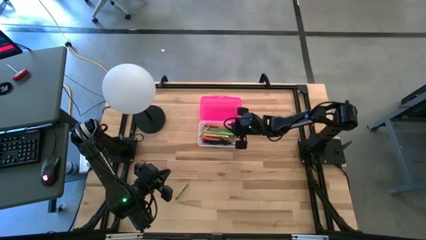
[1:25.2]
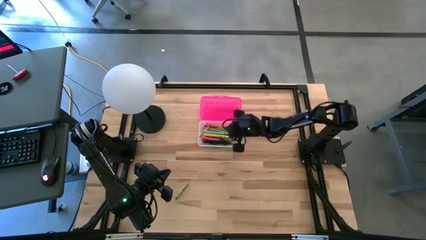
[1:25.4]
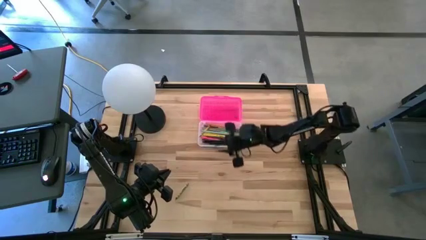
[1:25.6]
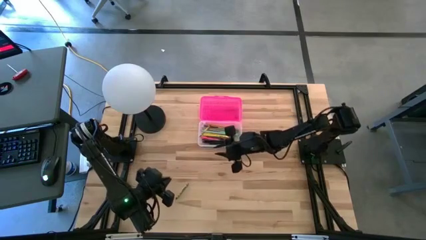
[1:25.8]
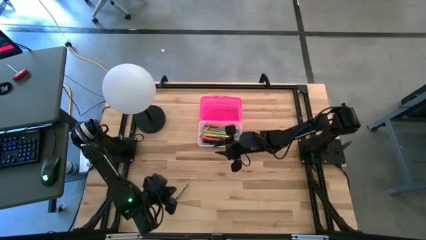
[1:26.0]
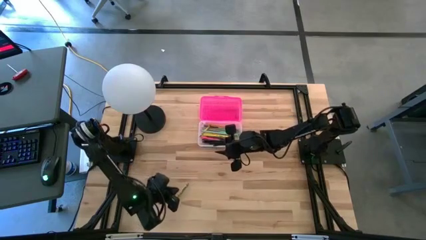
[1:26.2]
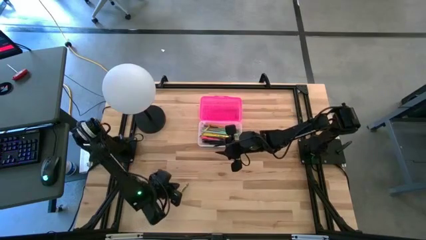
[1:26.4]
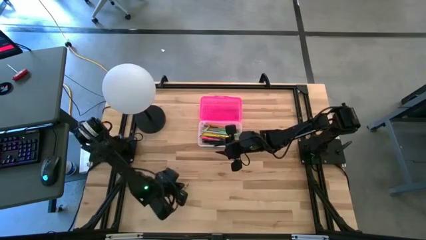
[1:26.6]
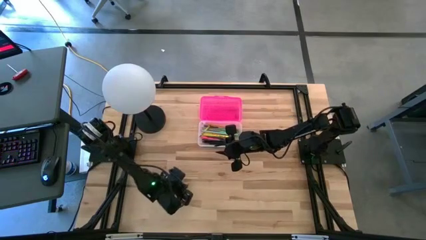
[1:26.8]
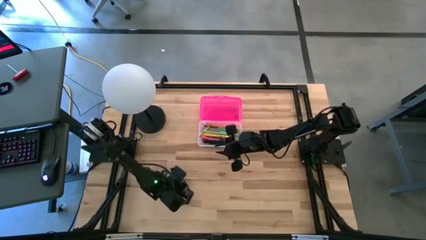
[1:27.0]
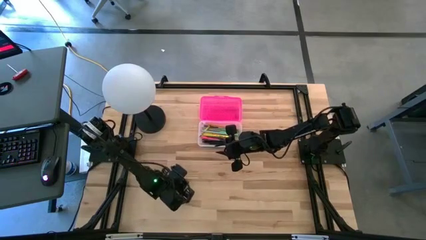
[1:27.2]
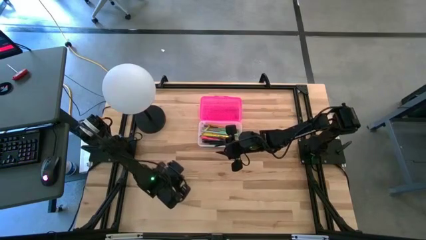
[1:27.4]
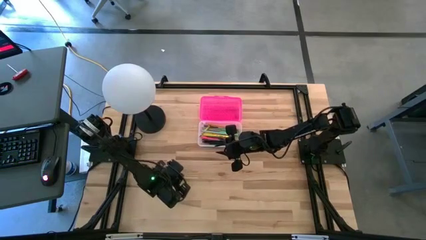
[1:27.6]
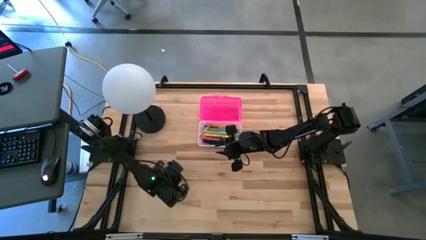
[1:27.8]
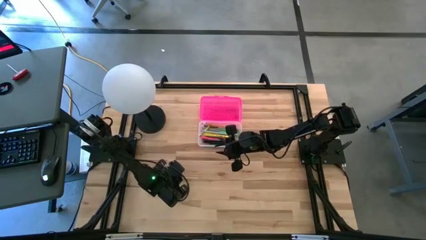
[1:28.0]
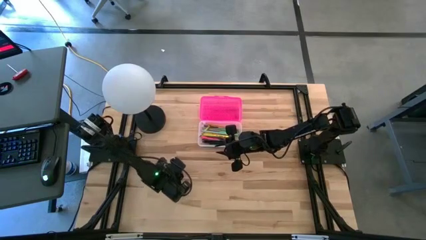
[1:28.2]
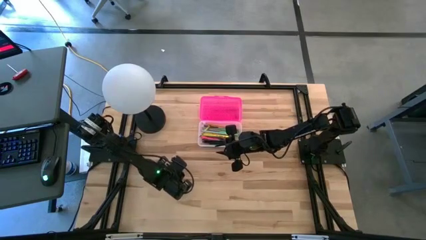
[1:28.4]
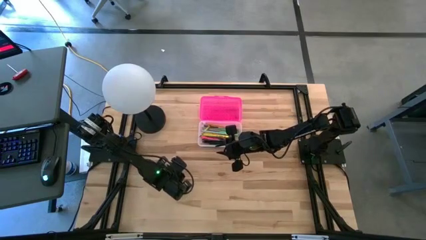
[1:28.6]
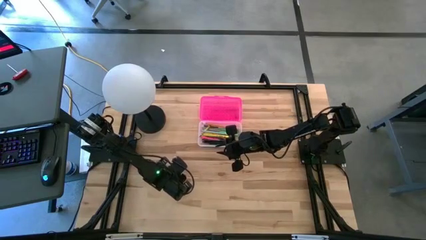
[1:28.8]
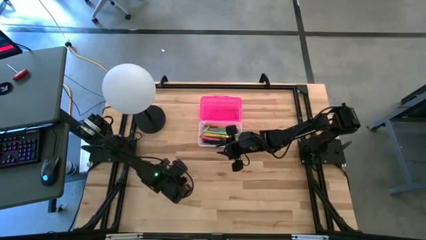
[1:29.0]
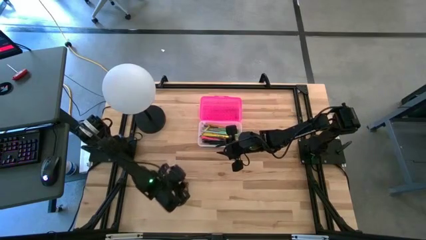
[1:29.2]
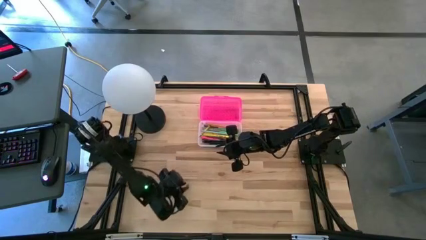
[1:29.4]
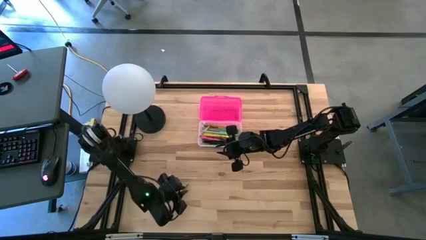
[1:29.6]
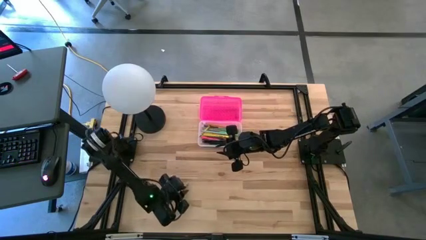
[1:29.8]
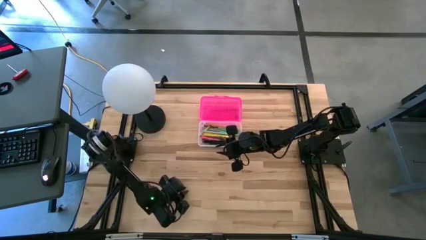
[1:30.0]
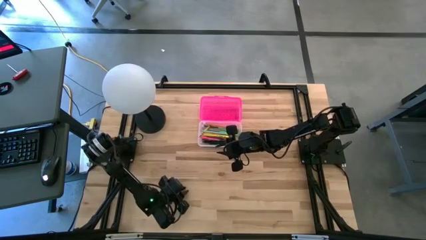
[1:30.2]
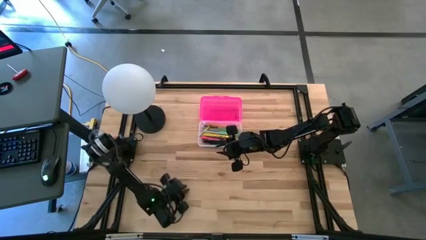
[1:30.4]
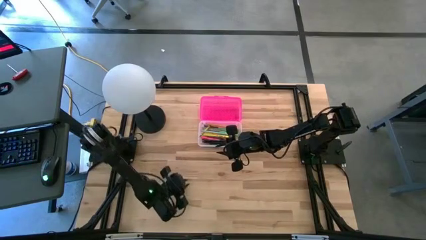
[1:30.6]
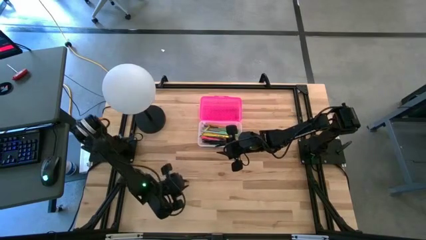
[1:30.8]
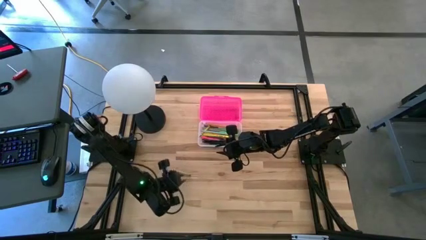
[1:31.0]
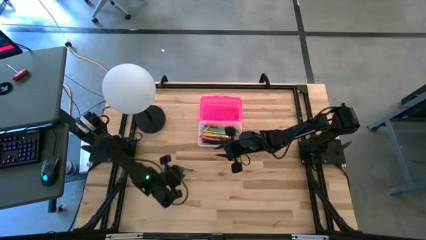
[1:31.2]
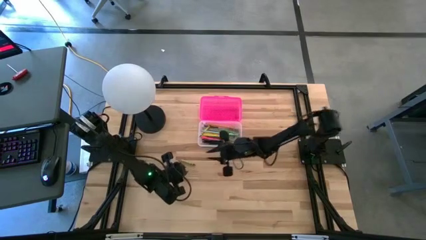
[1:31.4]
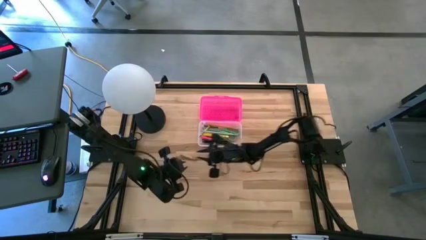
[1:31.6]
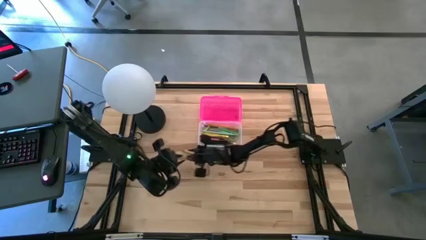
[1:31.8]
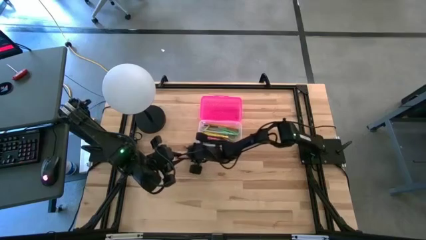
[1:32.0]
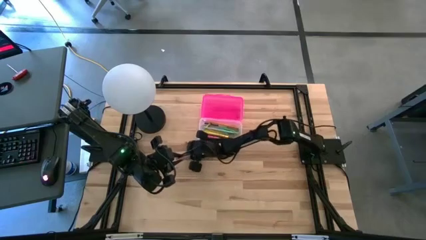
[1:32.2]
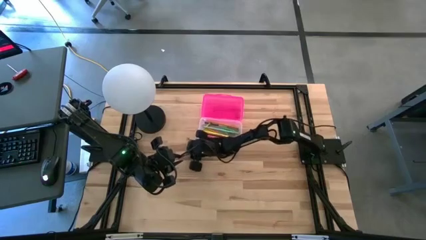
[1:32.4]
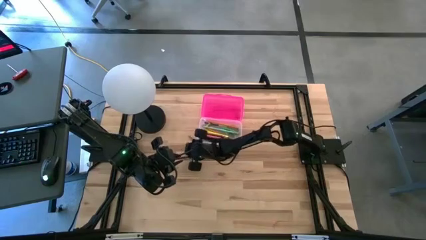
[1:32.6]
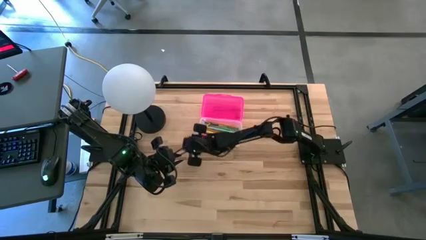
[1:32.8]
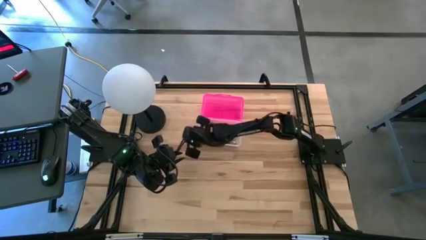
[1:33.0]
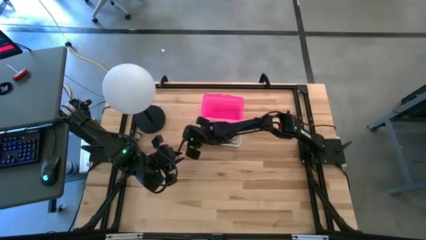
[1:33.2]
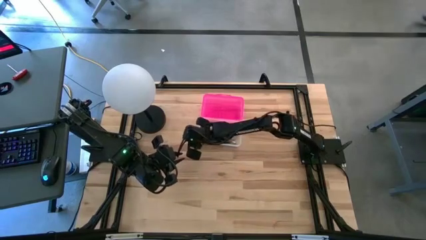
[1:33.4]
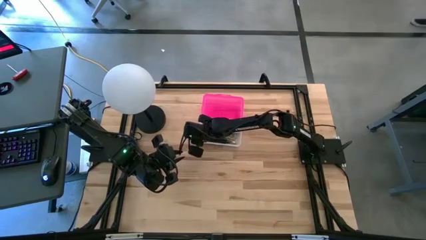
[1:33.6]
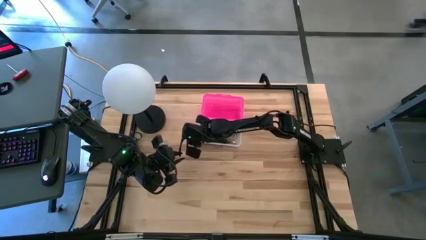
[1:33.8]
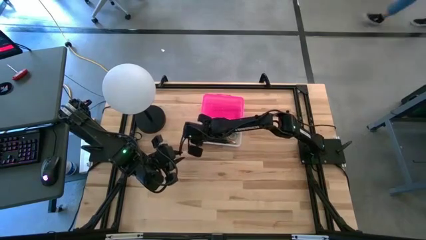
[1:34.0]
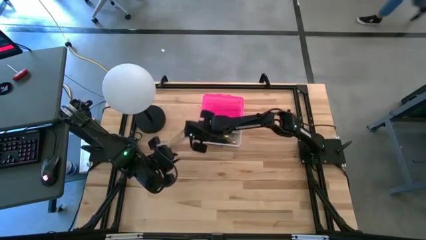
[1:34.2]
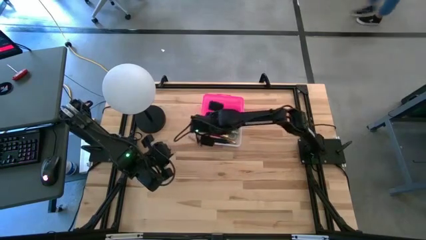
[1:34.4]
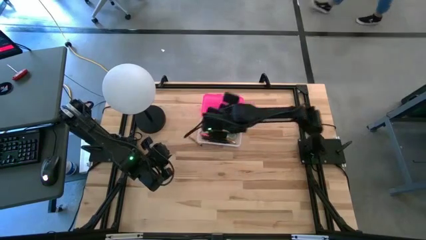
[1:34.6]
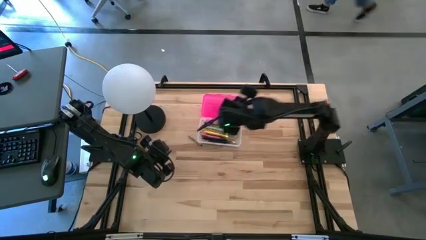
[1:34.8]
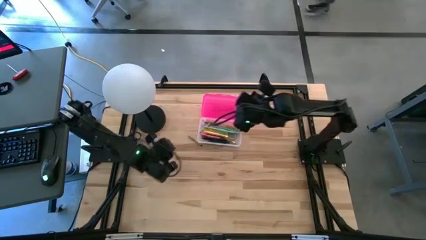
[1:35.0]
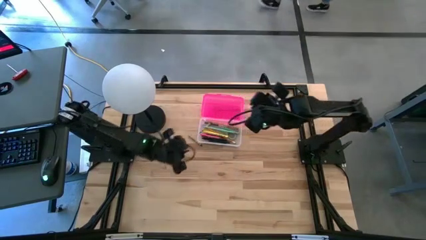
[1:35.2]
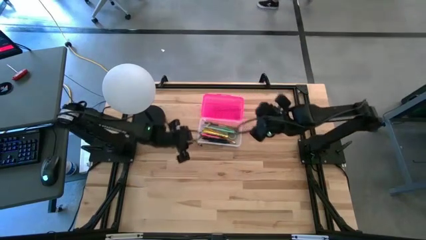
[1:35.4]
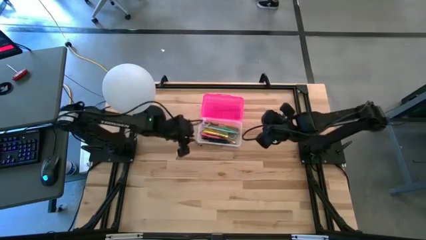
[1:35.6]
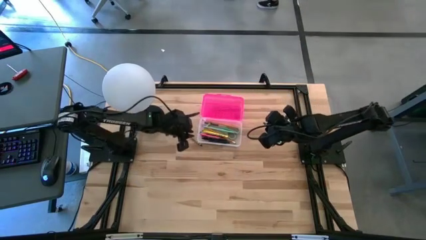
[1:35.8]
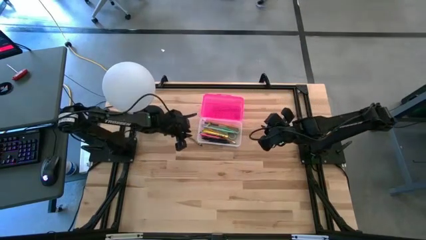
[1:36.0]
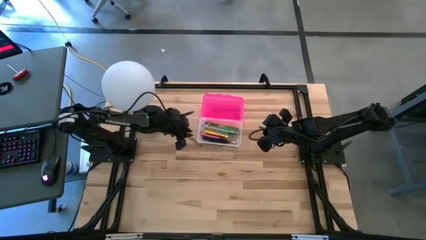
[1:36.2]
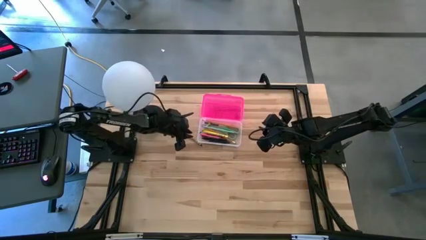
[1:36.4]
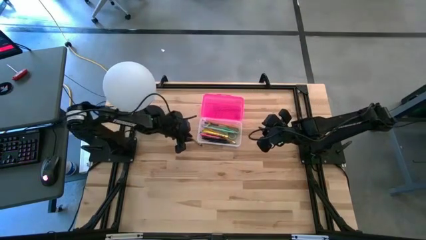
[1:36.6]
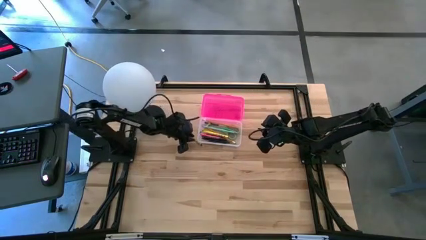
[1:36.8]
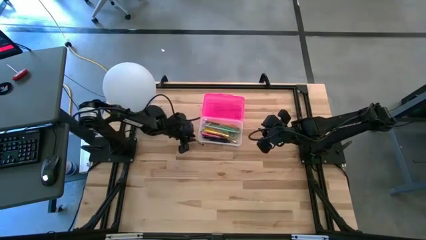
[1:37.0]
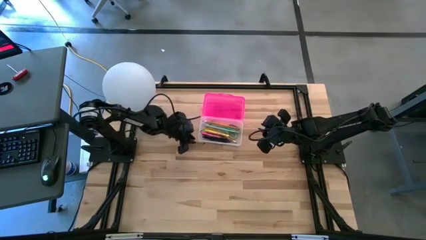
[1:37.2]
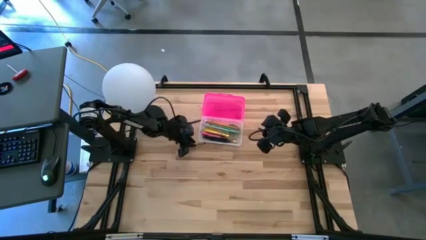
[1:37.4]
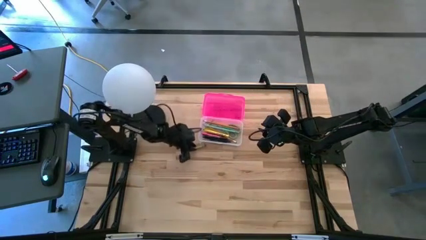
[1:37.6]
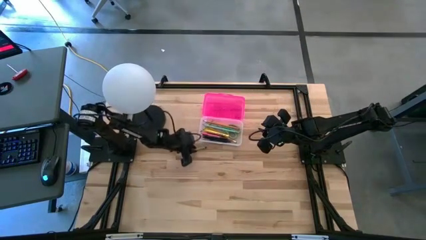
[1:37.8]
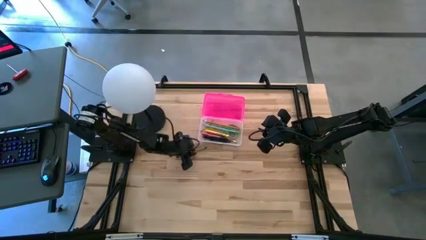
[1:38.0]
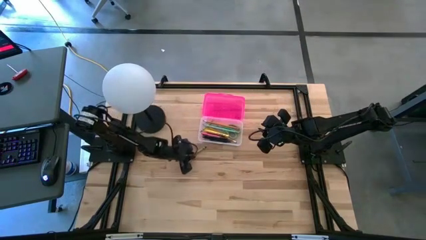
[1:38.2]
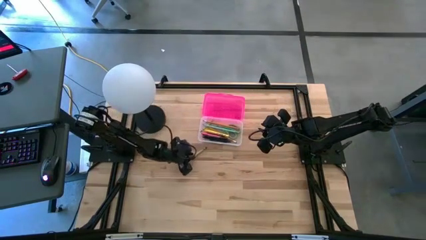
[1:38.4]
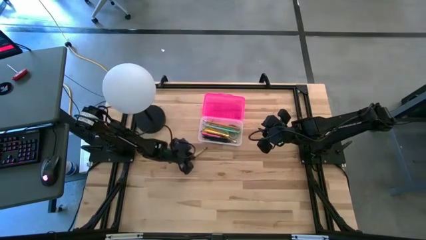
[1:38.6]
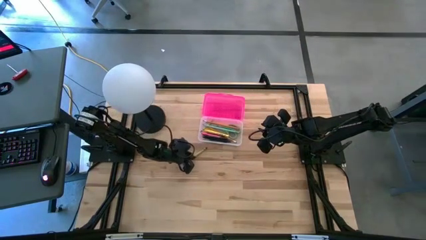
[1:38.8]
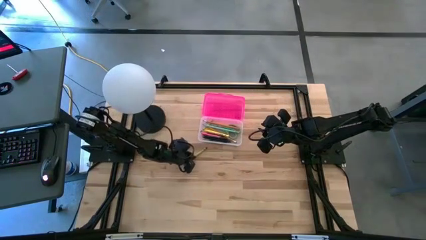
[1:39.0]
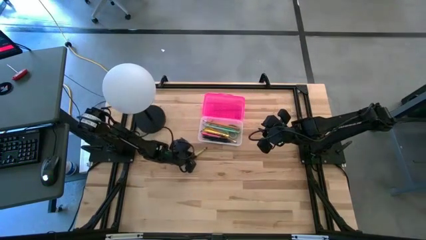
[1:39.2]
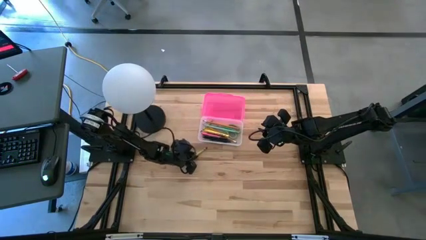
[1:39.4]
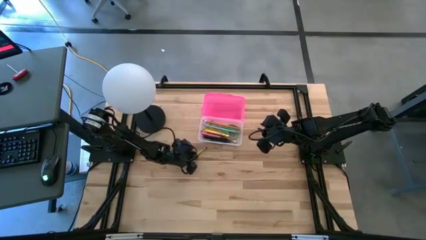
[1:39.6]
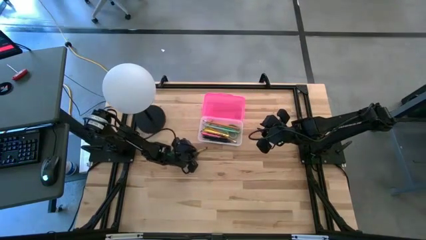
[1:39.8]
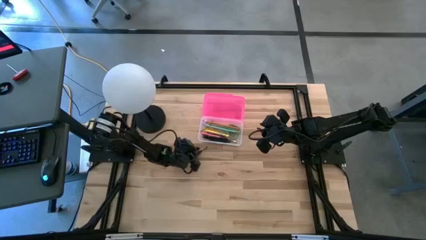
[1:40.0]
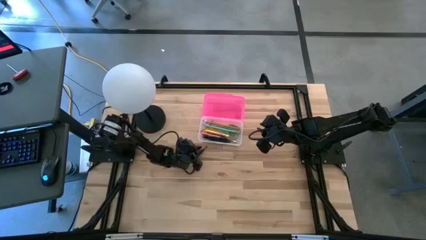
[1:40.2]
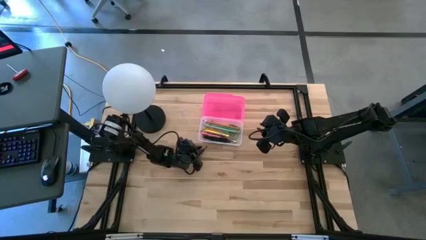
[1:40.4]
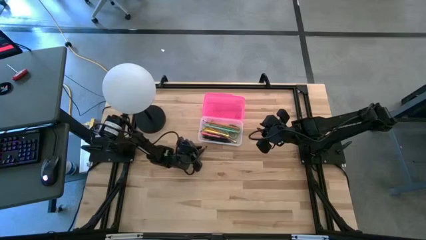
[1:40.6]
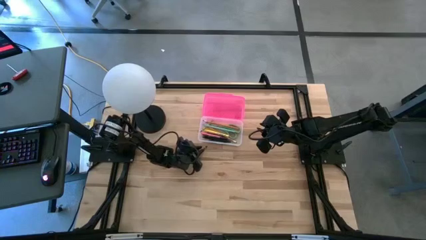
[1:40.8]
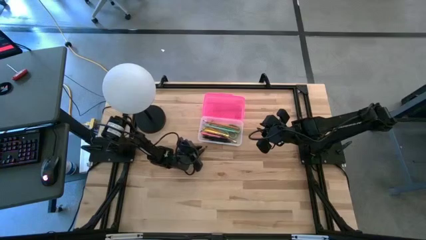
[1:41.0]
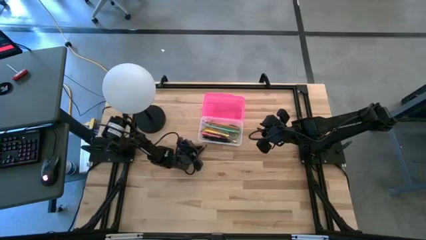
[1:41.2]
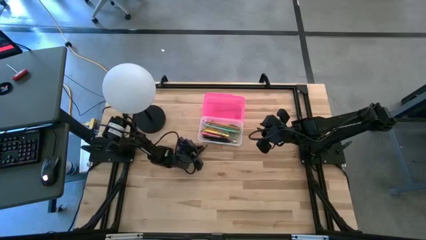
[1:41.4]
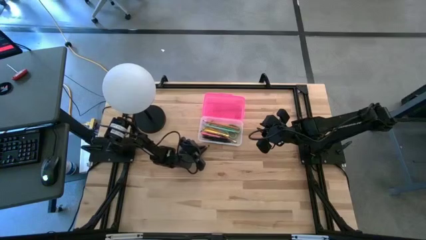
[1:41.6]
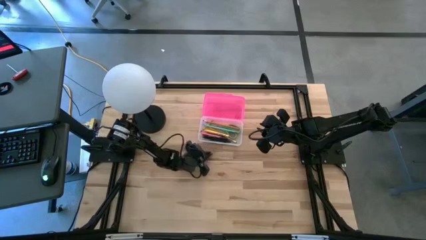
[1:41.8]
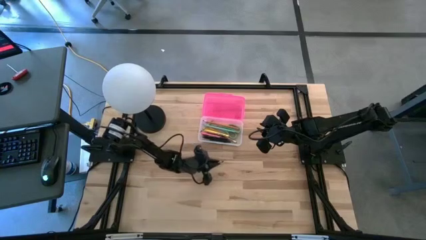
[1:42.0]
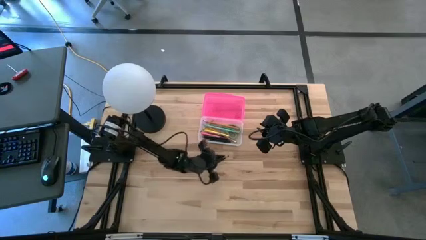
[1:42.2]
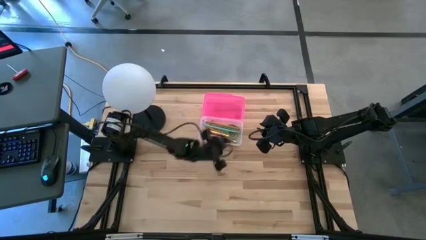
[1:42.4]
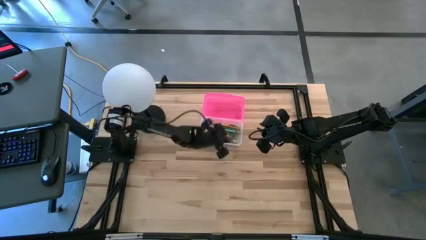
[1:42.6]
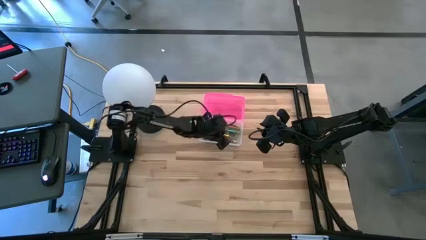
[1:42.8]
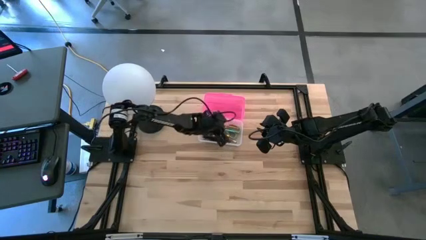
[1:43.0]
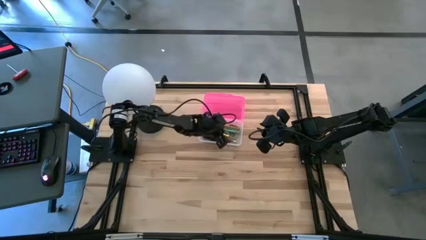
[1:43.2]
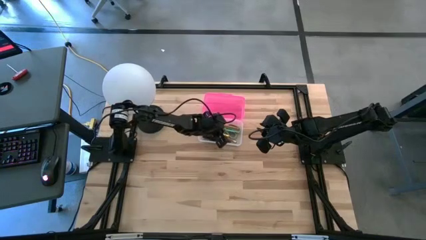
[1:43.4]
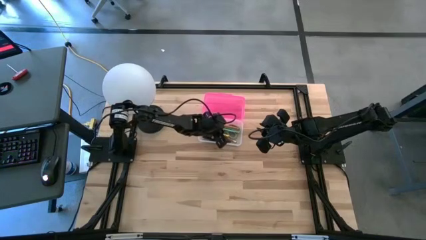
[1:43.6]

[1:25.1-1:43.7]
Task: Pick & place school supplies into a supply box
Put the green crayon into the pink supply box
